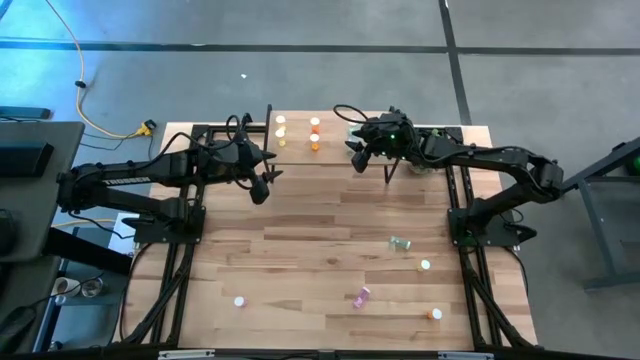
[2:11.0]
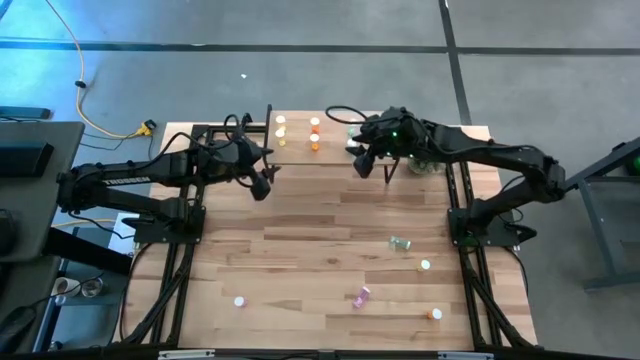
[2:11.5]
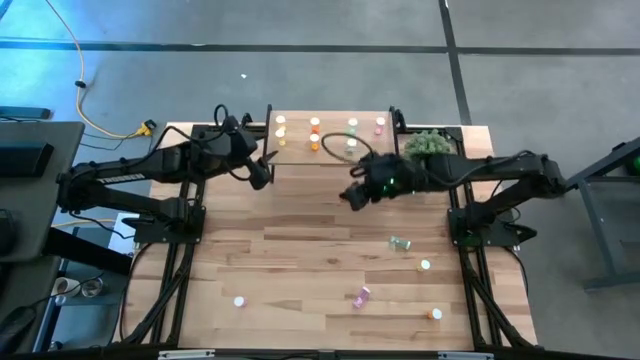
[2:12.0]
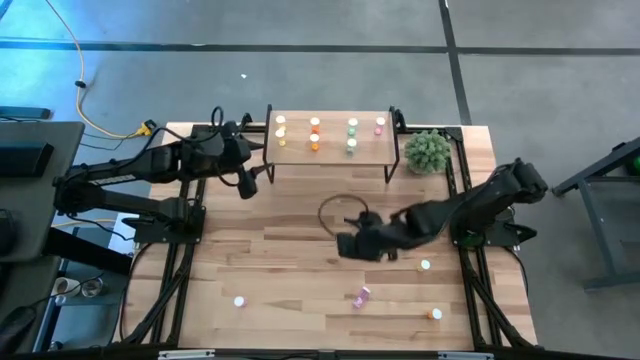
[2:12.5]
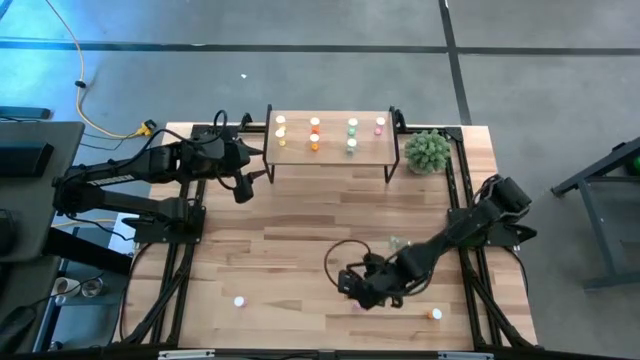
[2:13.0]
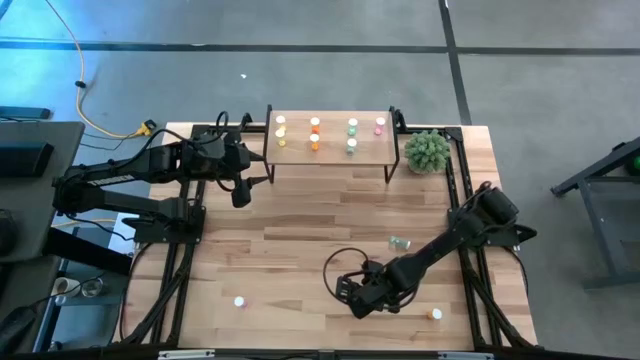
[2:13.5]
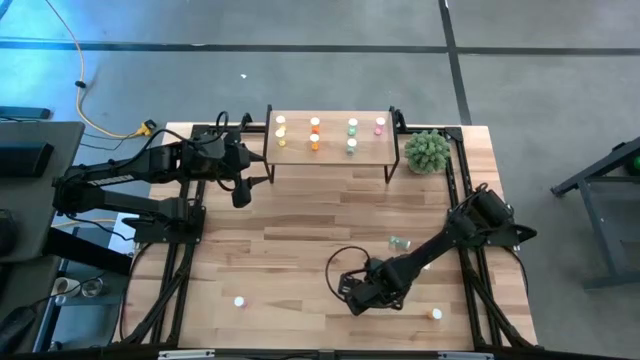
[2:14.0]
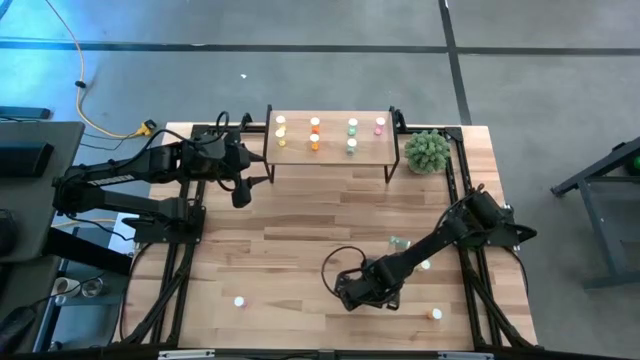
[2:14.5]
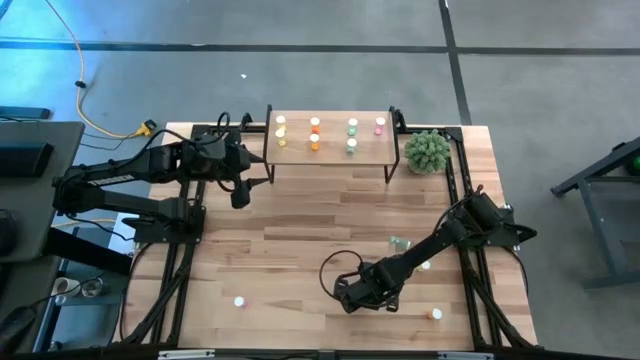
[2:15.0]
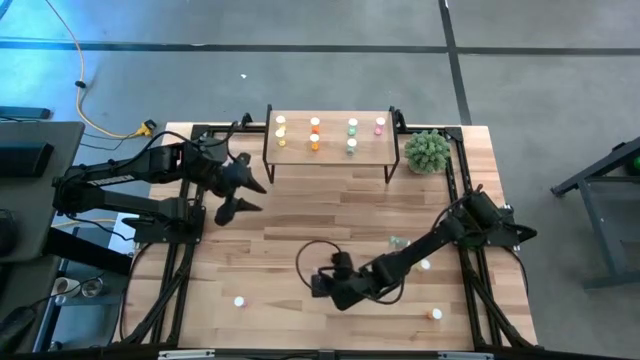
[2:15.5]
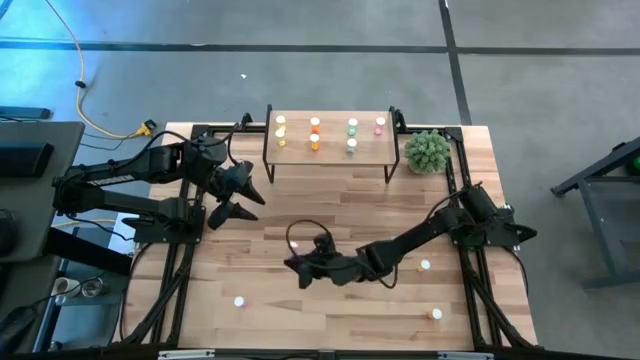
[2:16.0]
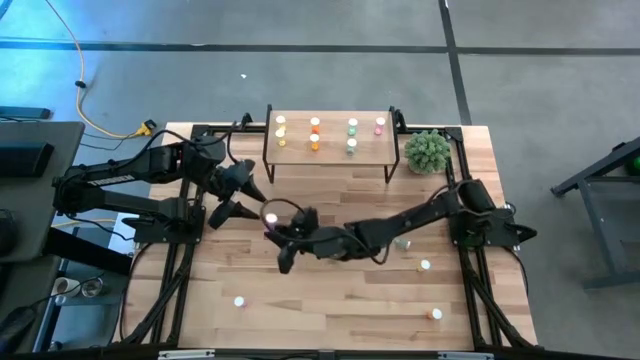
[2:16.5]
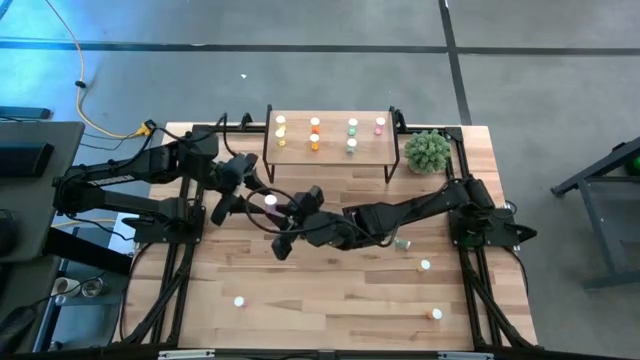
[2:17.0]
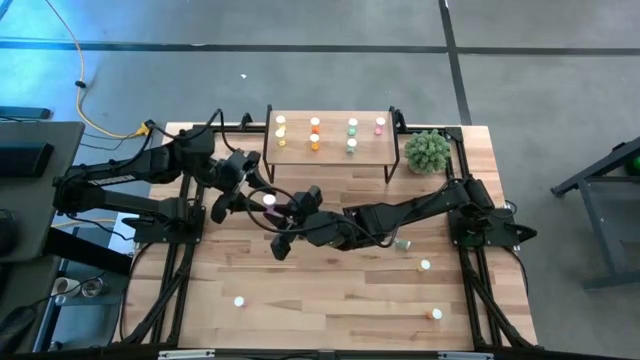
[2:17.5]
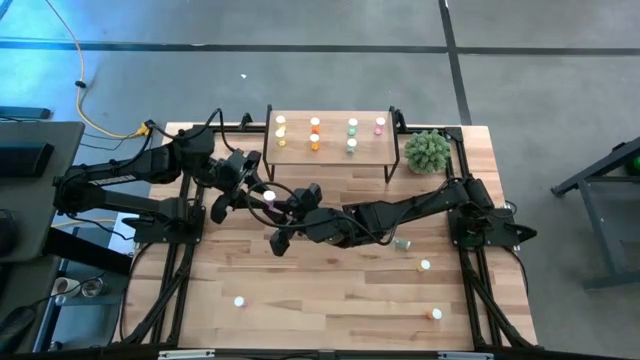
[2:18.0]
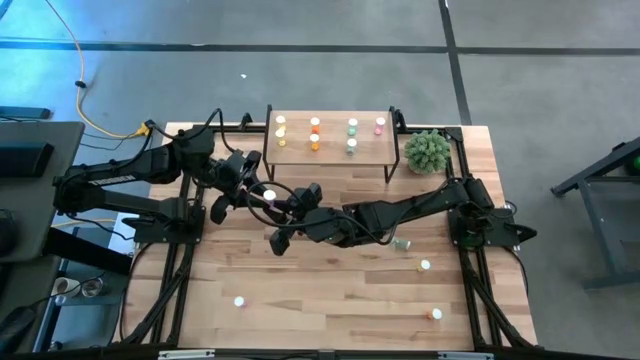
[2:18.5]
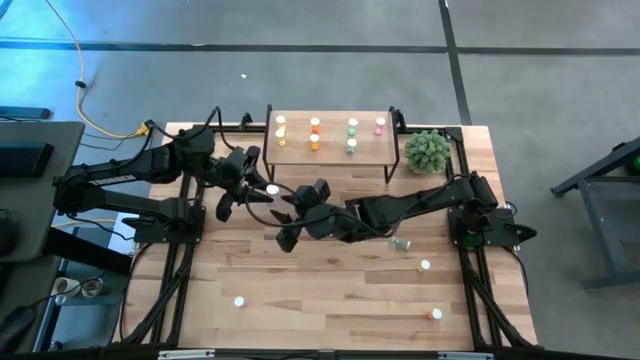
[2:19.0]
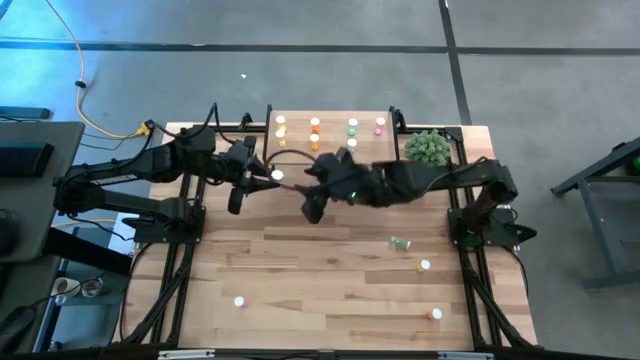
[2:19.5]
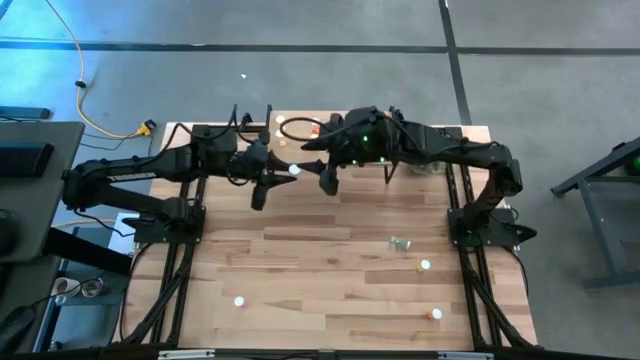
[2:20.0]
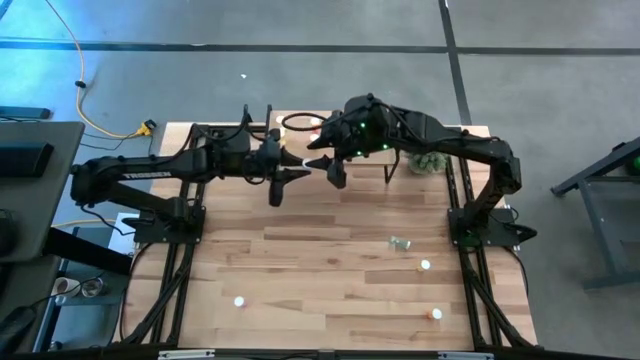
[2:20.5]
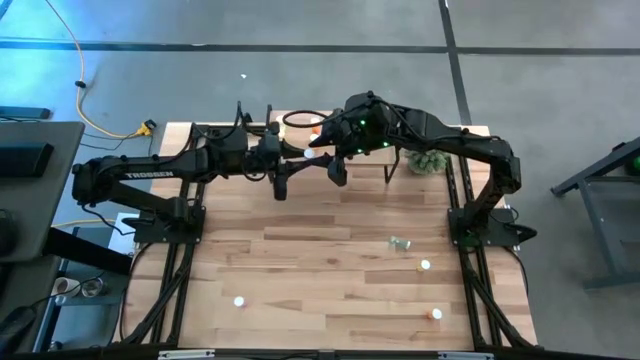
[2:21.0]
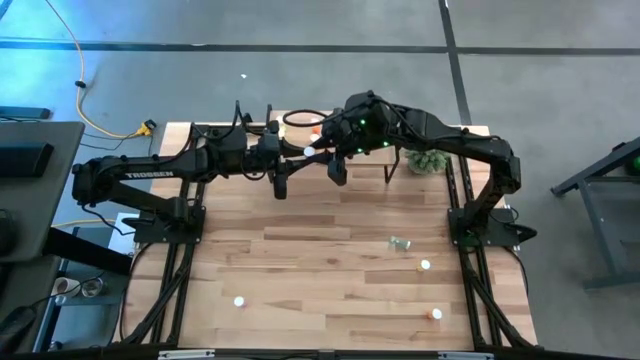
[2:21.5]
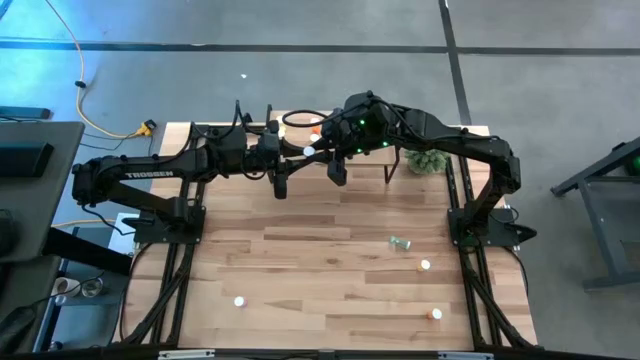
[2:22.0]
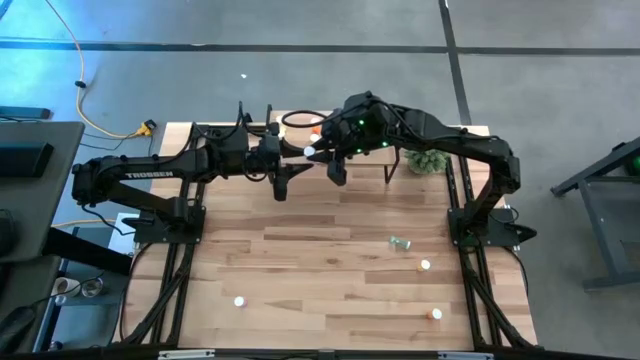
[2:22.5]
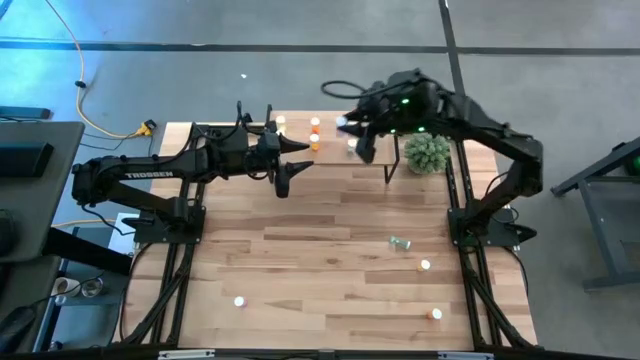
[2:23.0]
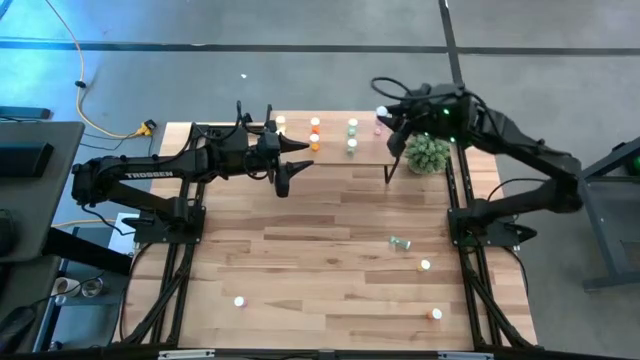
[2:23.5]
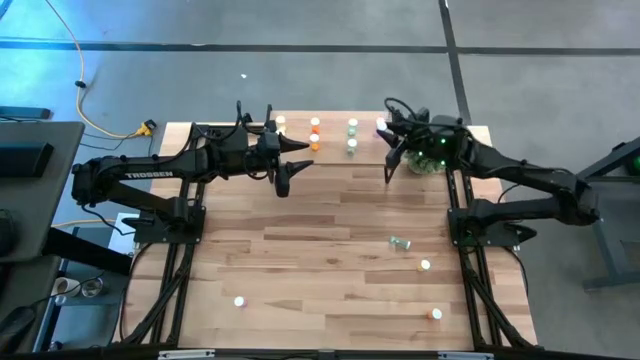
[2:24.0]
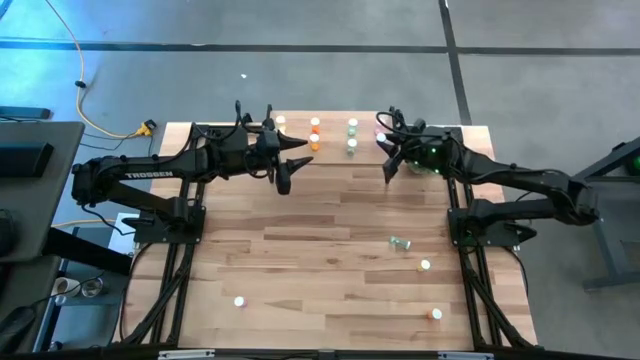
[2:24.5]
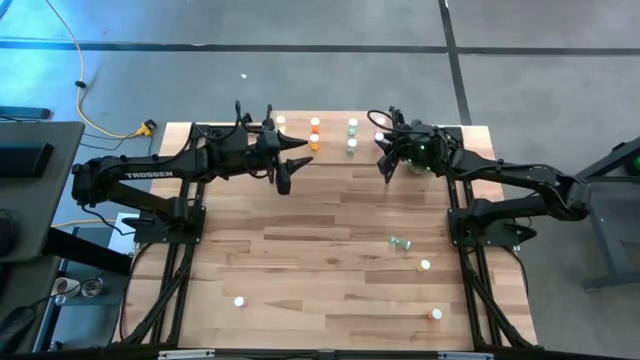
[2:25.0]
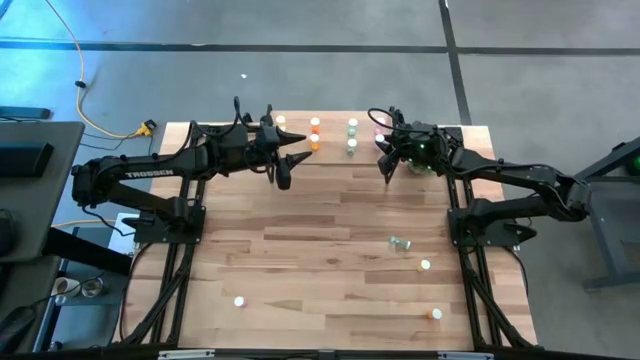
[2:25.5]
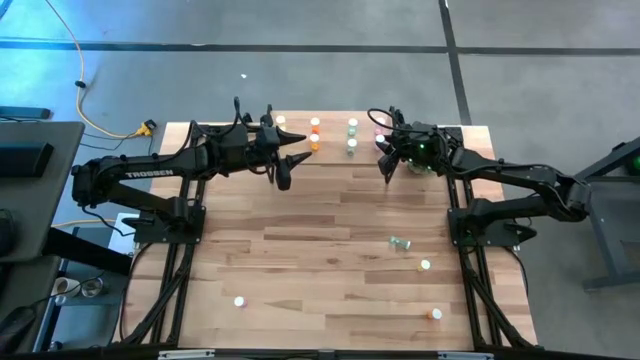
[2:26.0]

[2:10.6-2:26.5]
Task: Pick and place medicine bottles onto shelf by color
Put the right pink pill bottle on the shelf aligned with the other pink pill bottle

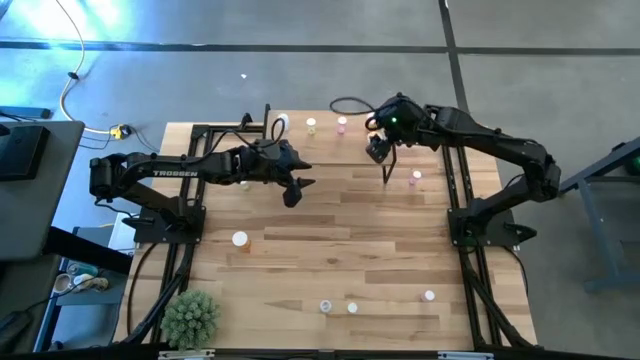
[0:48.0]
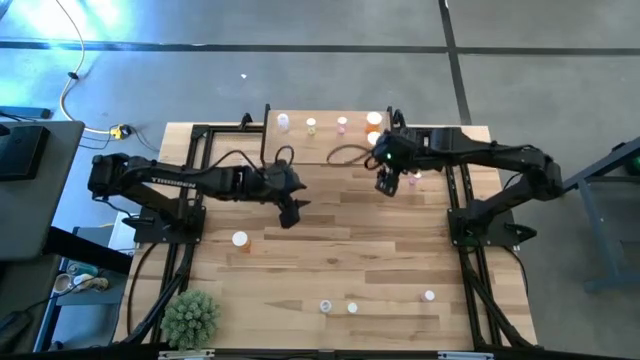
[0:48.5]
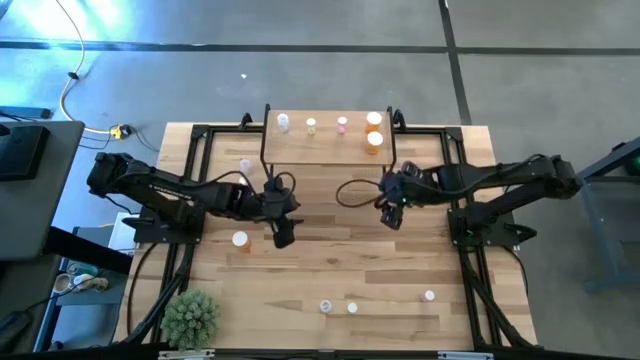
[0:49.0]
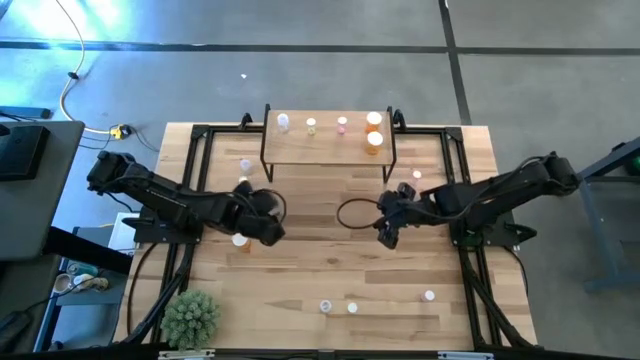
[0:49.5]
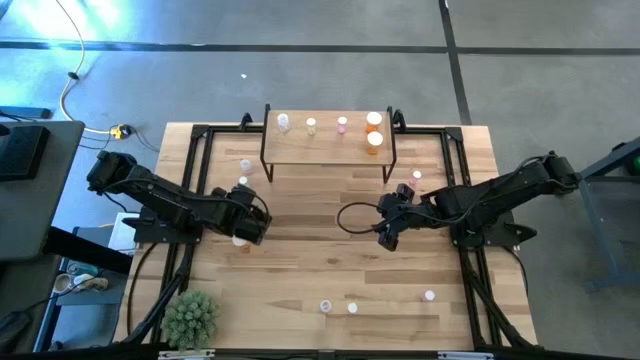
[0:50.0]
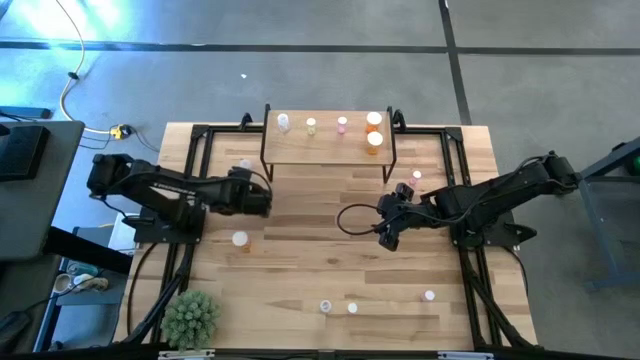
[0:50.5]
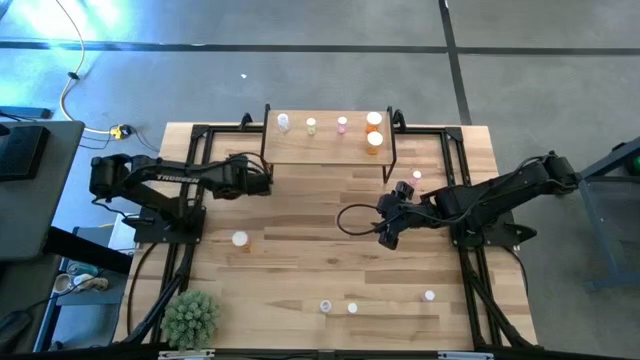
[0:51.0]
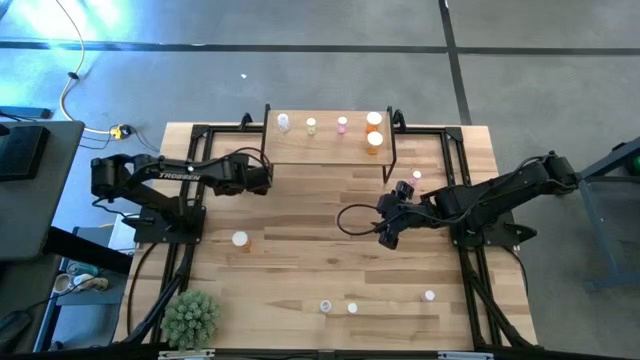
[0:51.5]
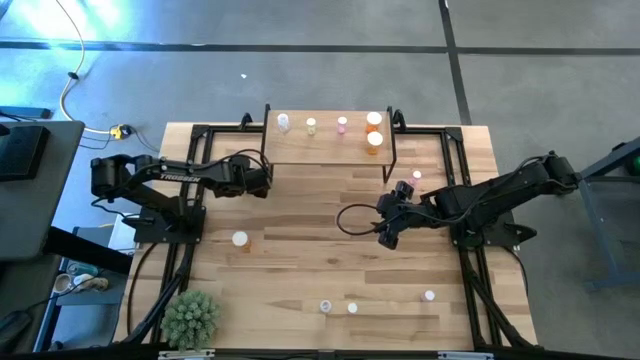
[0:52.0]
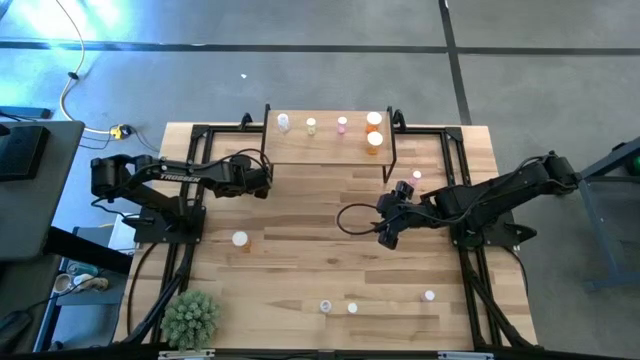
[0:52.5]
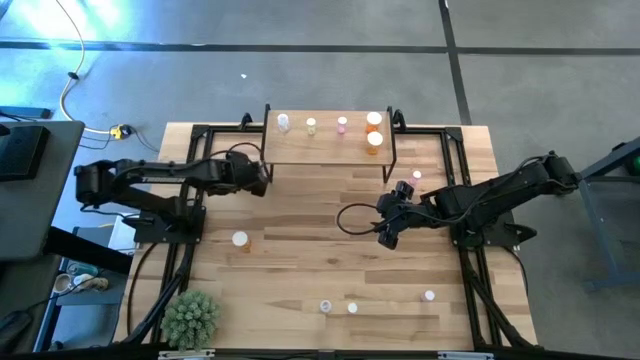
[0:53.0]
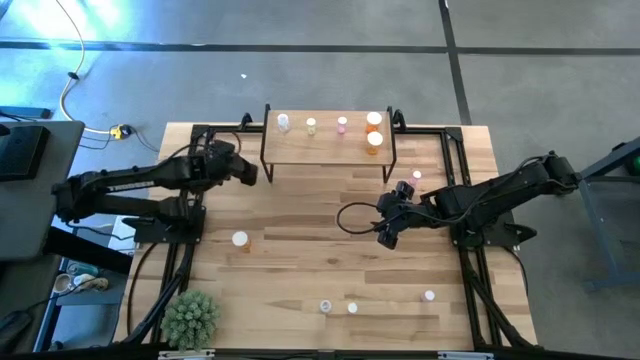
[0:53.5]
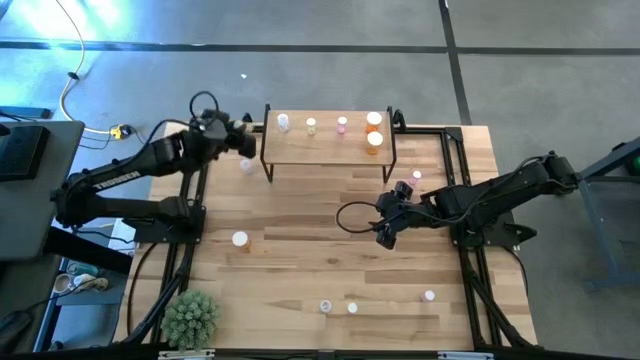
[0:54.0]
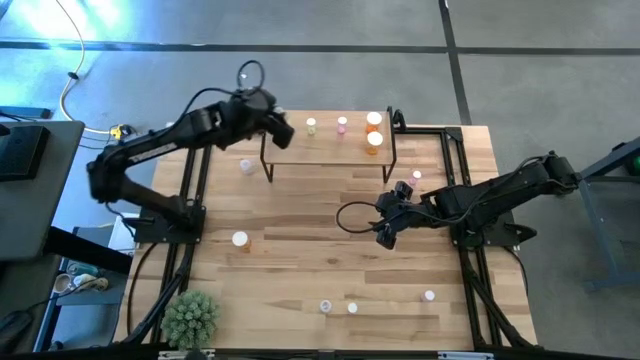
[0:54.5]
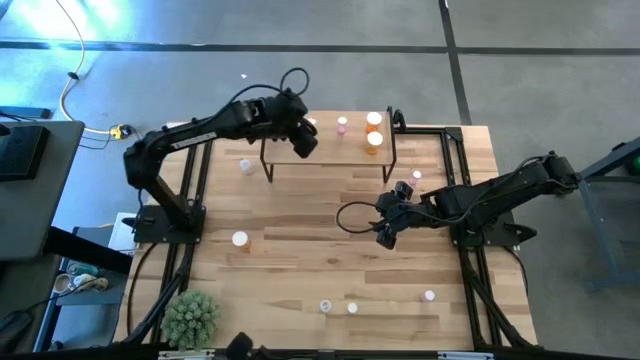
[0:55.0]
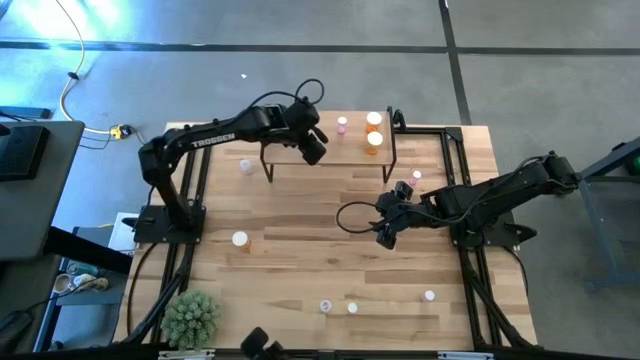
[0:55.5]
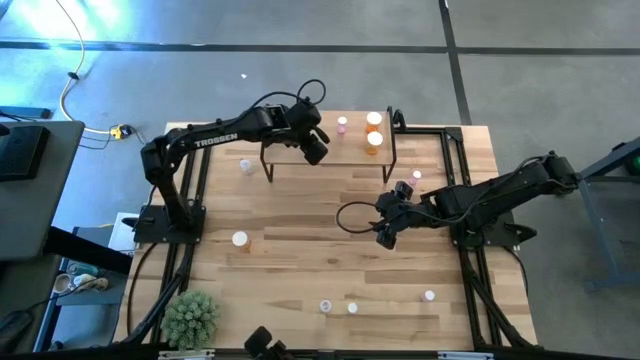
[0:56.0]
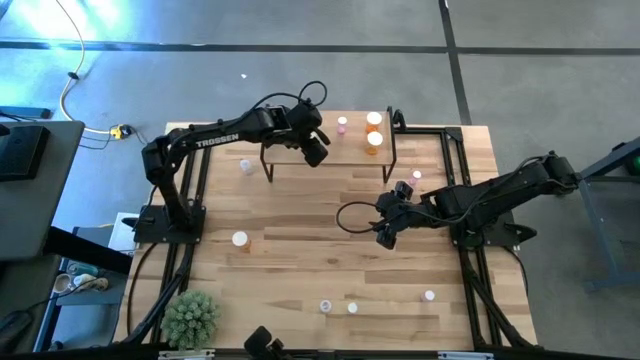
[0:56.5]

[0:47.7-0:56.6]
Task: Pick and place medicine bottles onto shelf by color
Put the top yellow pill bottle on the shelf aligned with the yellow pill bottle
